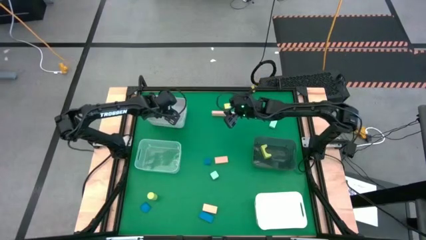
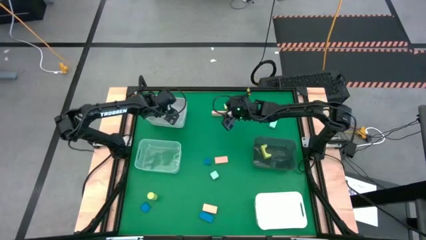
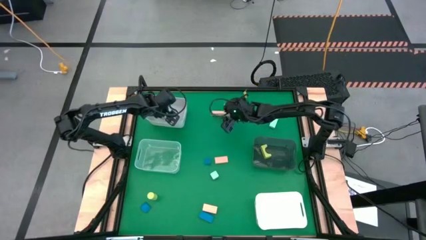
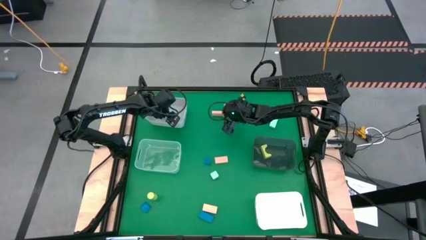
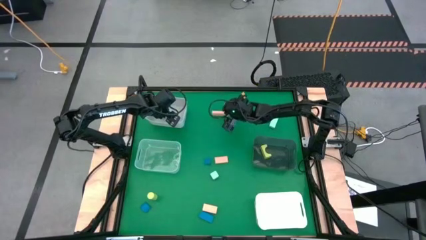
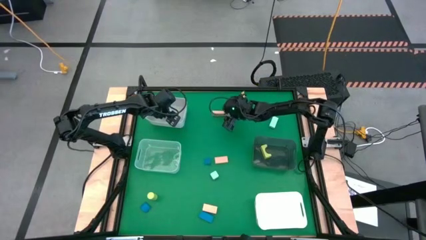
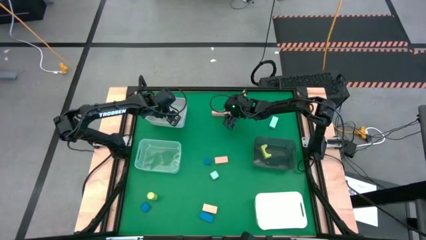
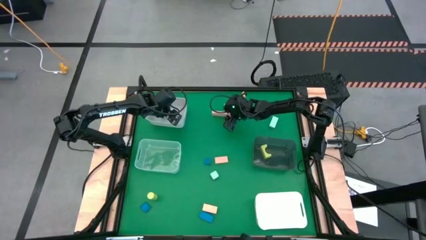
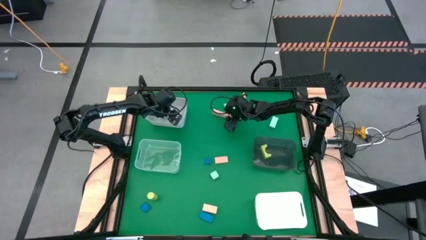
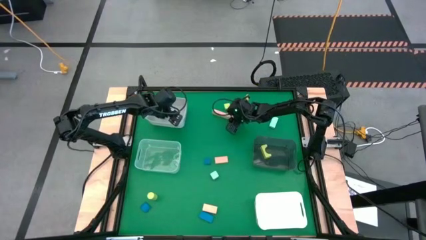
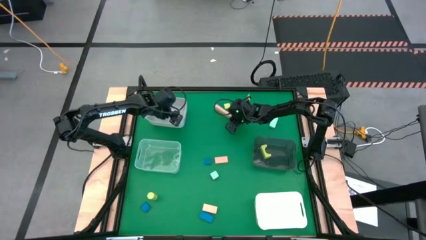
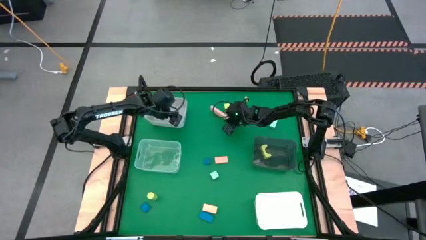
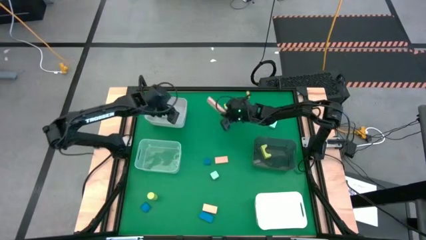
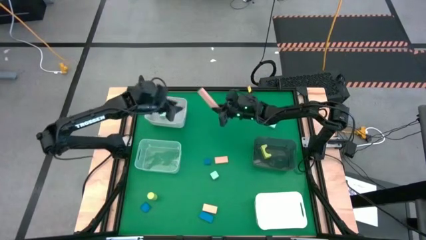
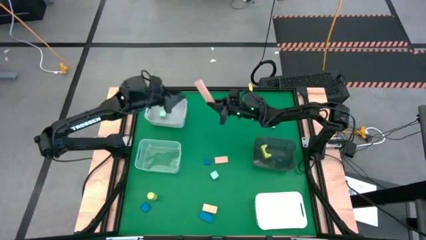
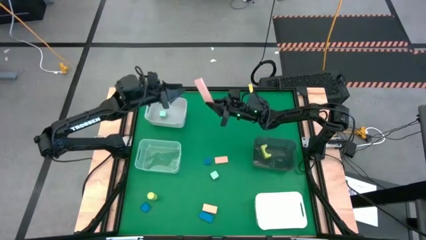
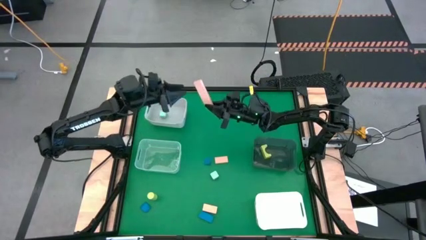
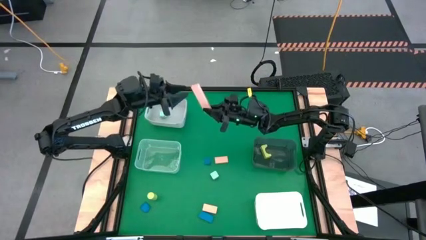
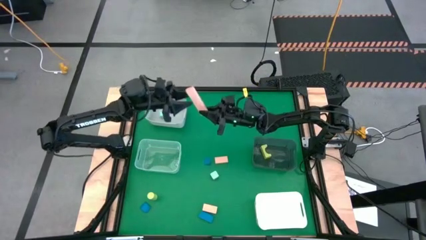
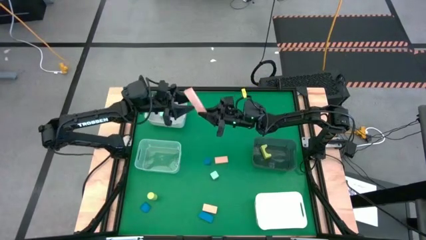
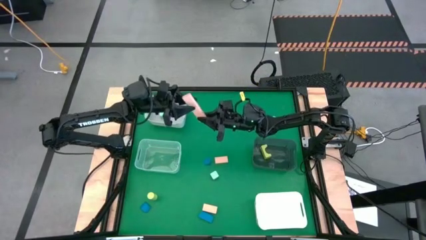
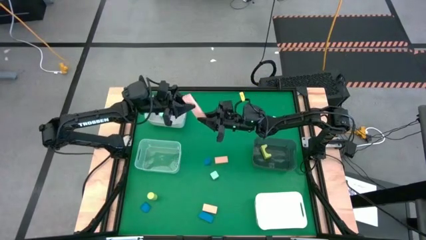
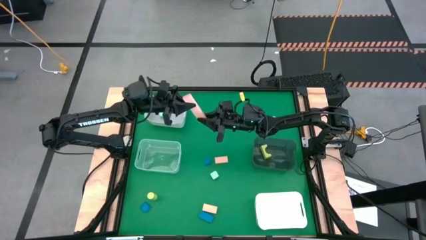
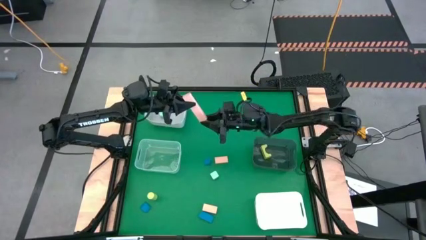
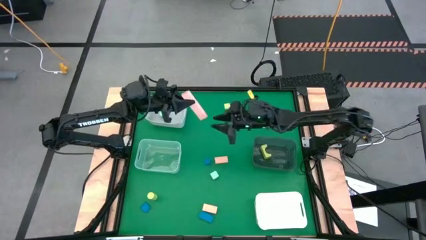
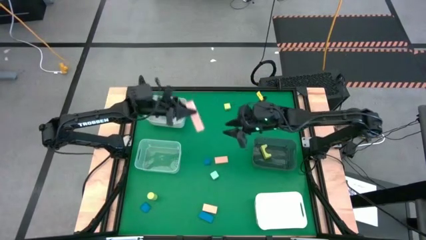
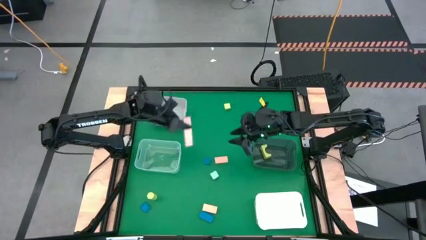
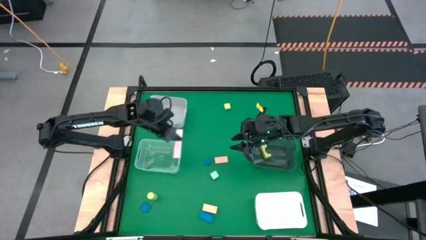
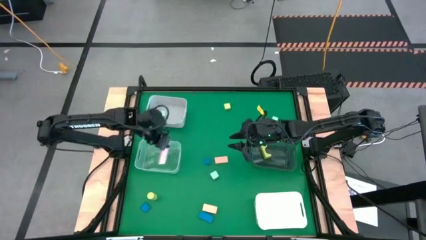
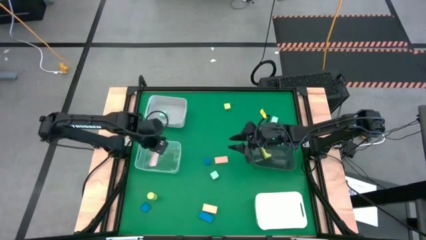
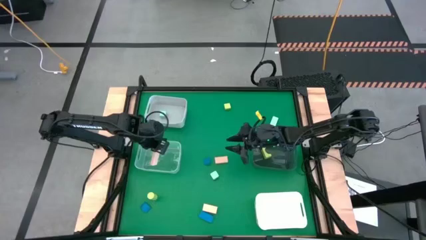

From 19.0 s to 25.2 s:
Task: Sort & place blocks by color
Put the top brown block into the transparent bin

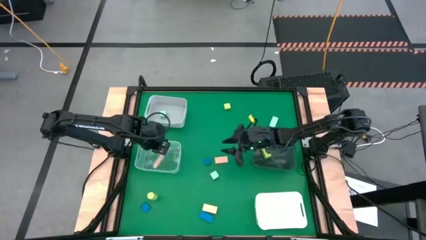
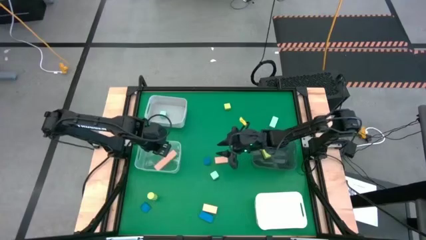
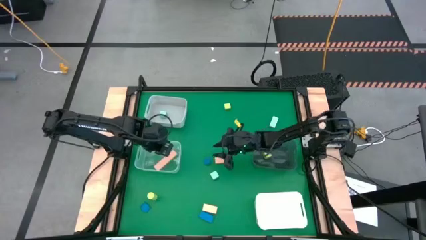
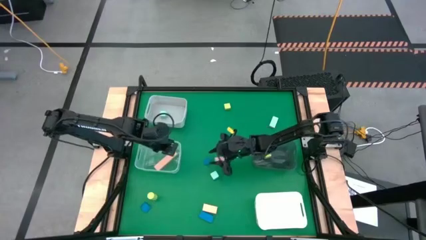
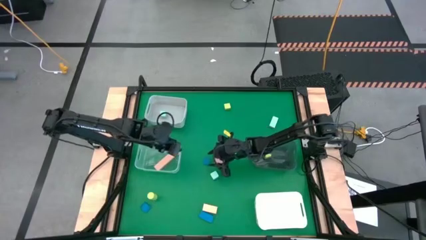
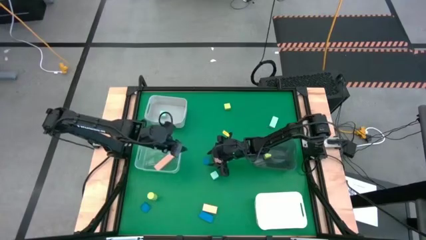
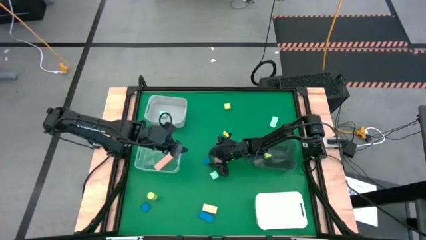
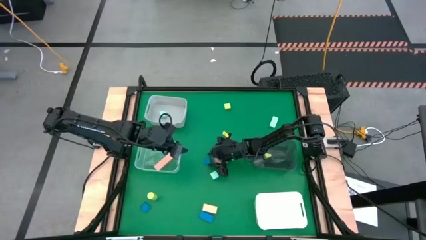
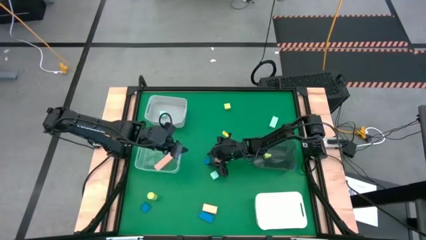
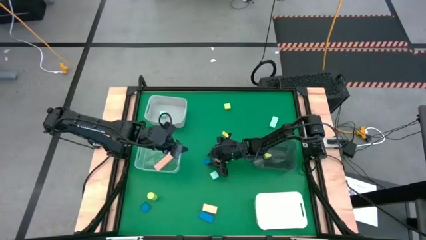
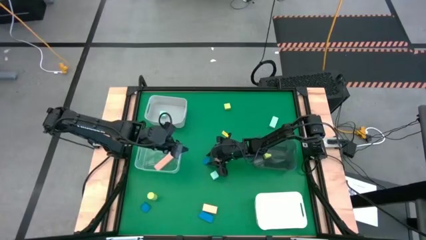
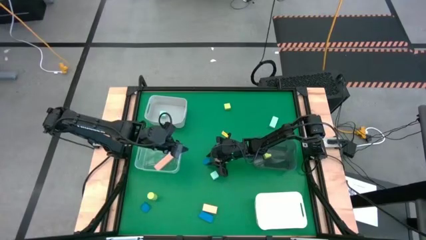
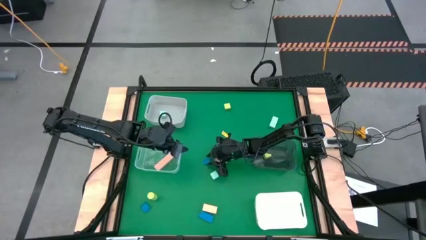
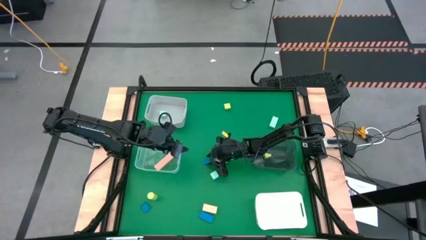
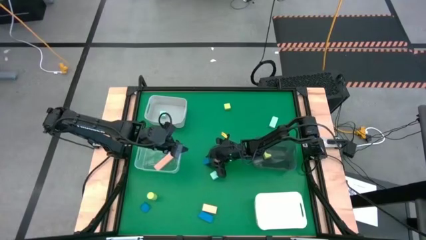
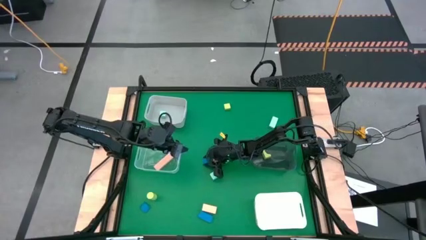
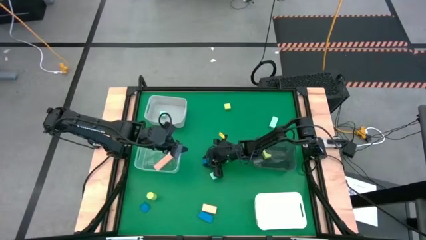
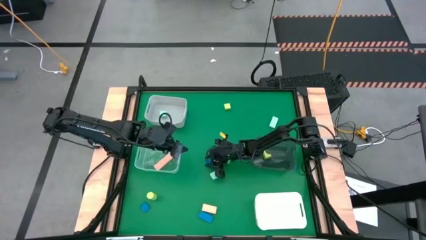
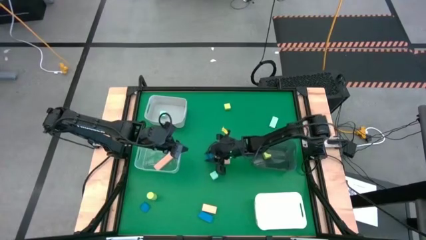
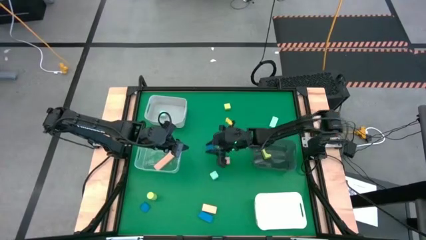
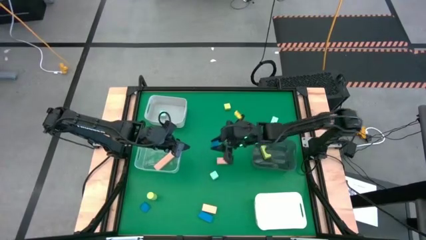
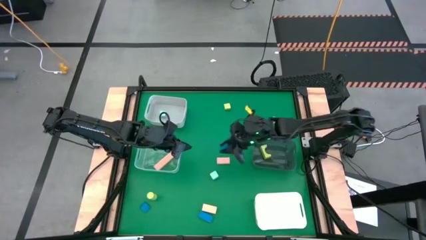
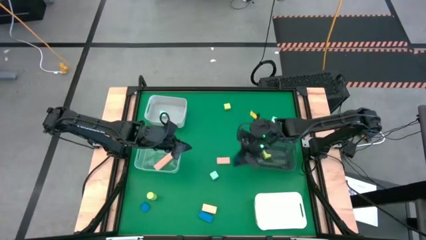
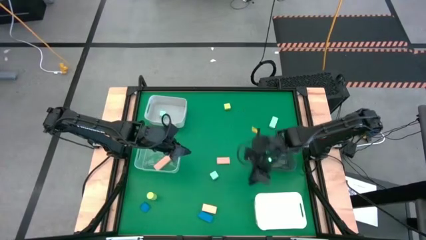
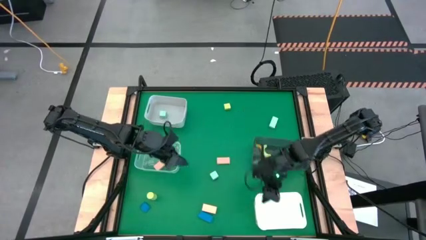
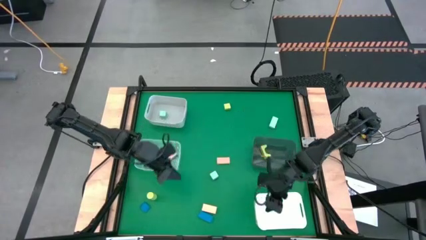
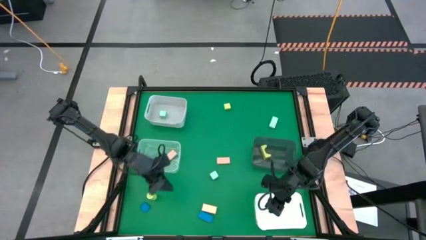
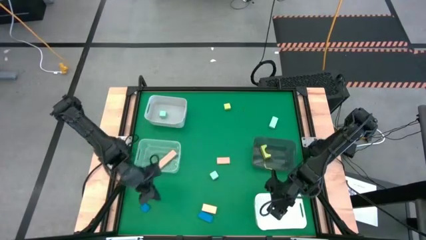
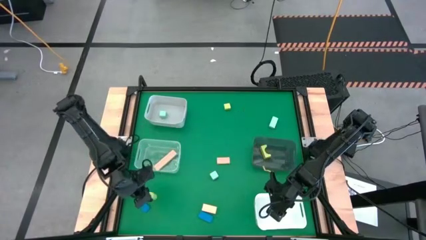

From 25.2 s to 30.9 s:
Put the top blue block into the white bin

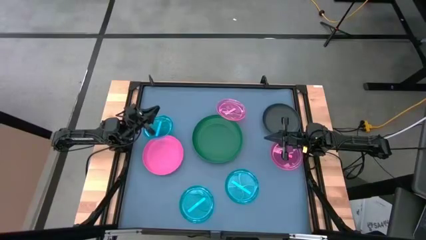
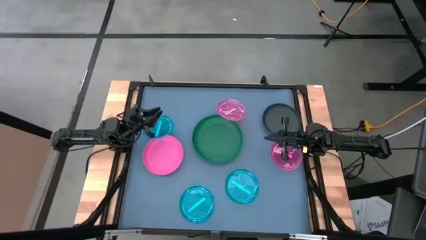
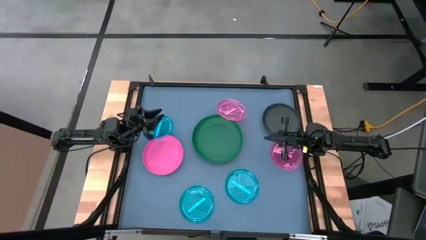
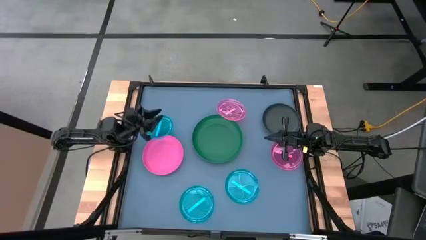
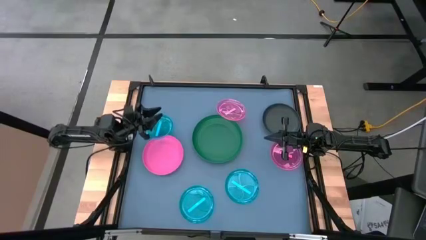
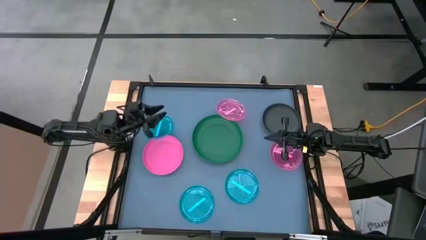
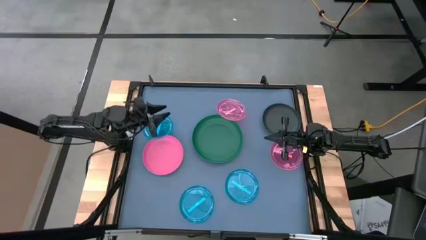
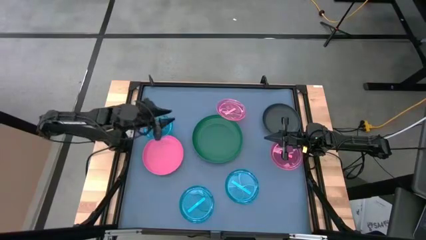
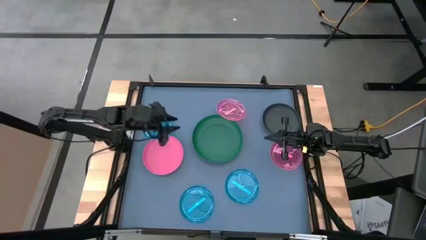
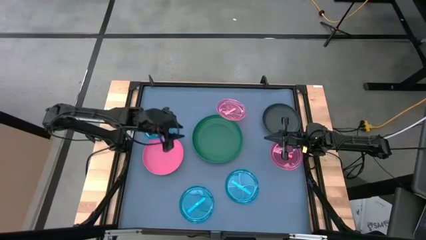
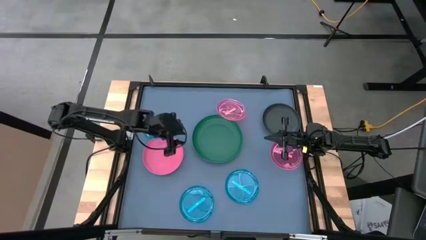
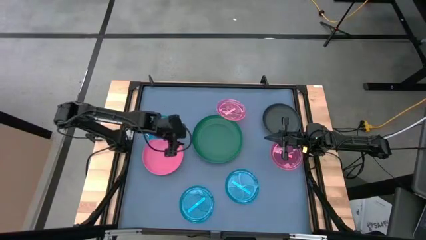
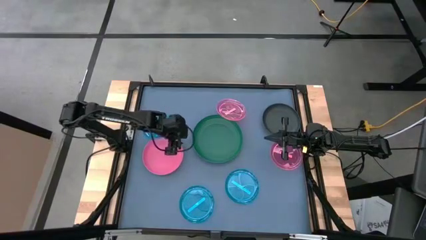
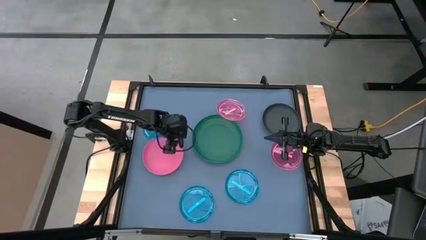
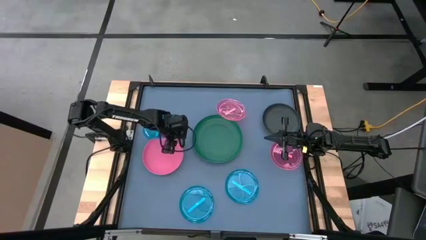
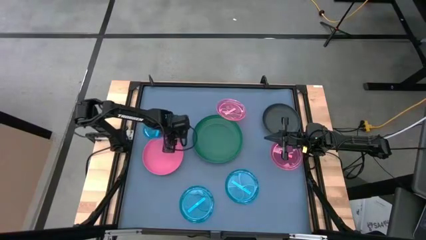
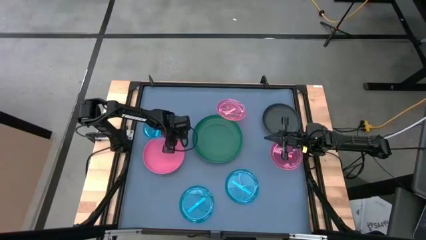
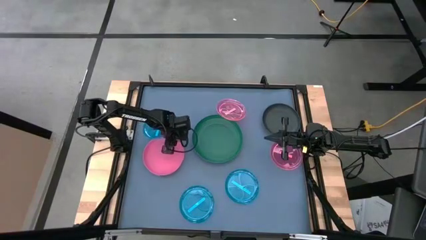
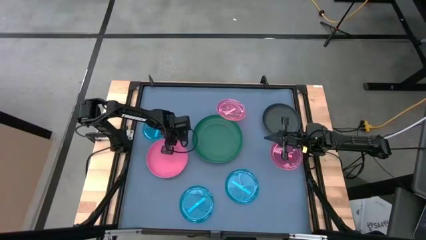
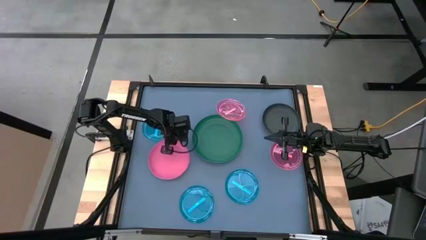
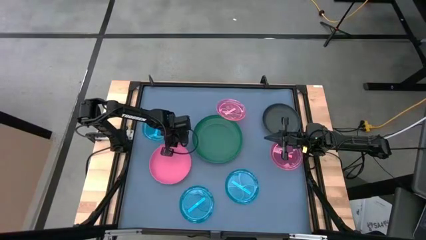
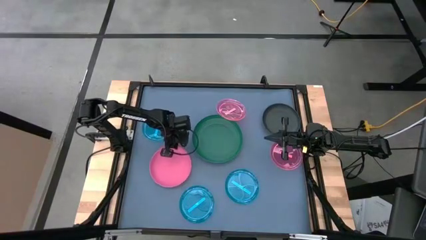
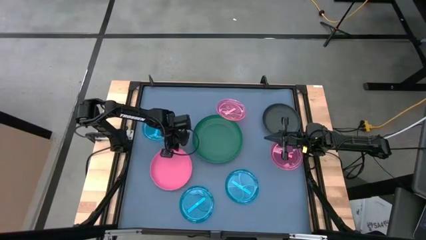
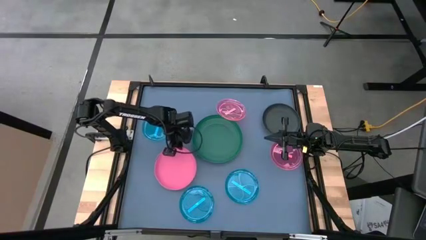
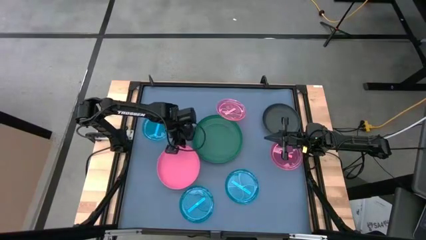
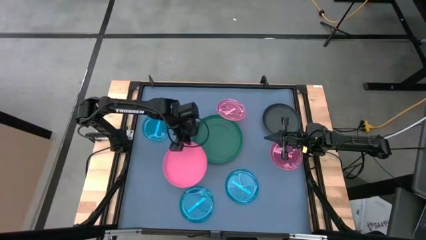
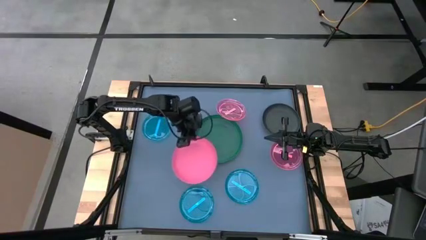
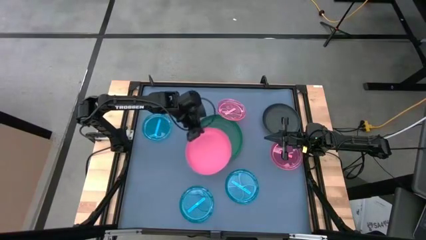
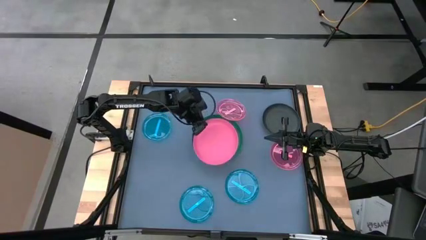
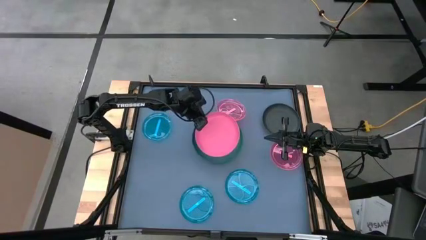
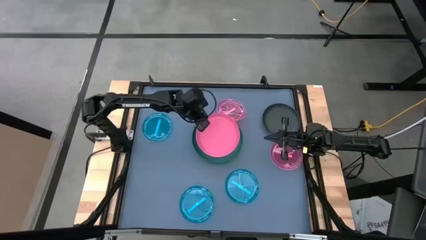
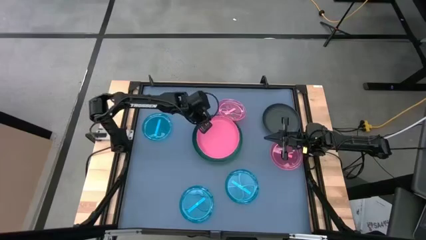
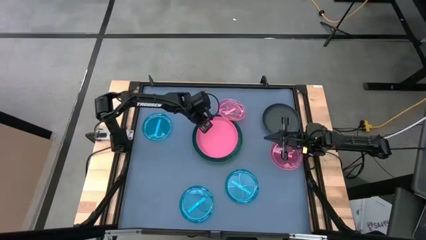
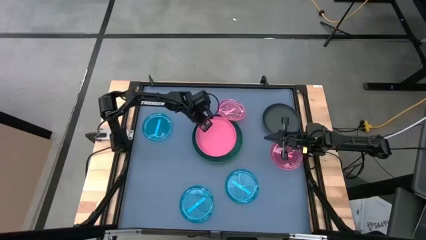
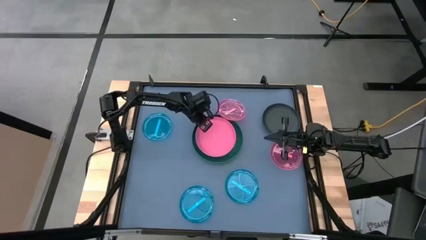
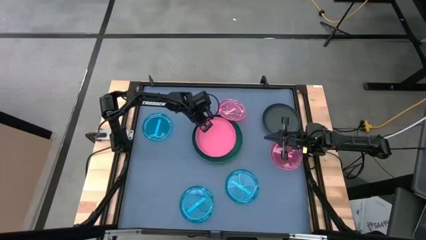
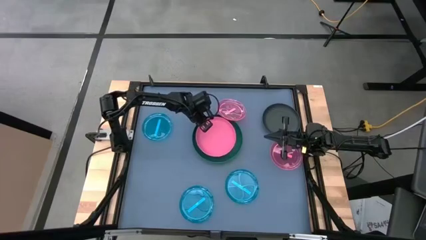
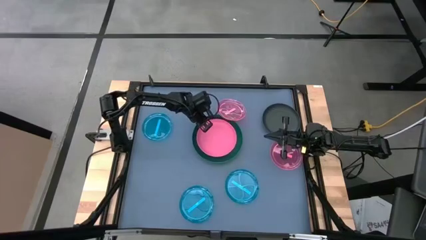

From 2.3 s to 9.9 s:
Task: Stack plastic plates
Stack the pink plate on top of the green plate
